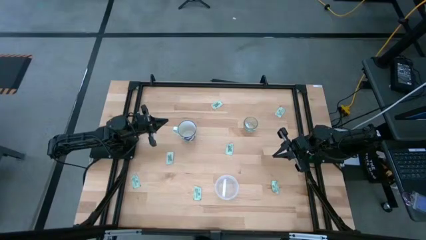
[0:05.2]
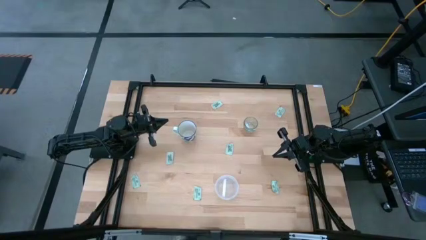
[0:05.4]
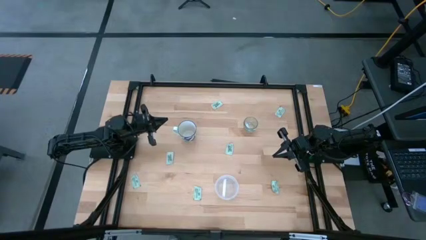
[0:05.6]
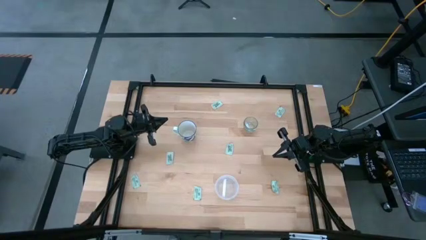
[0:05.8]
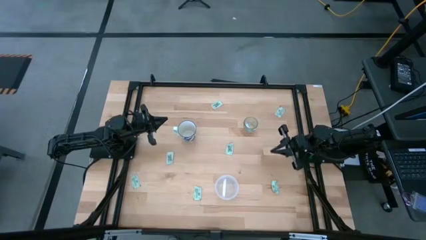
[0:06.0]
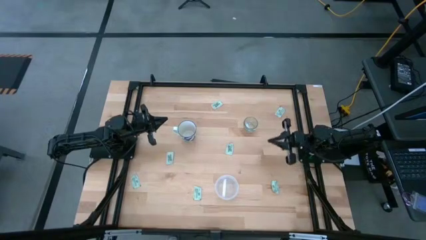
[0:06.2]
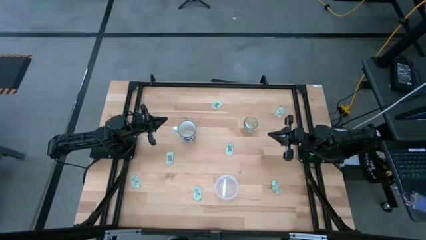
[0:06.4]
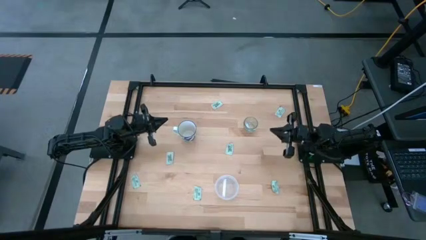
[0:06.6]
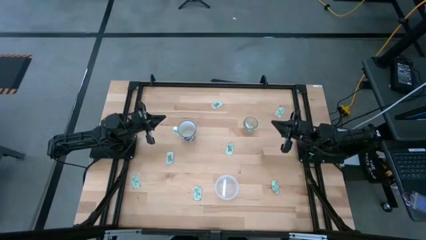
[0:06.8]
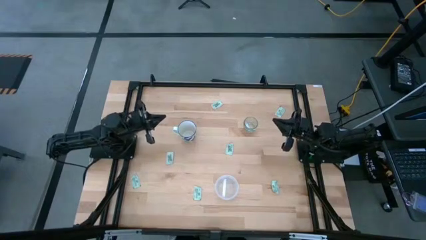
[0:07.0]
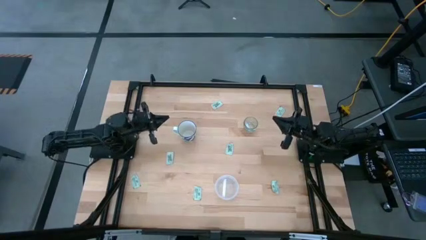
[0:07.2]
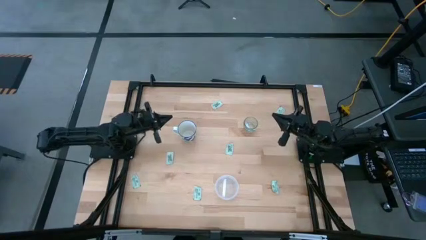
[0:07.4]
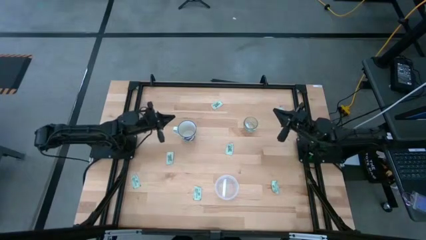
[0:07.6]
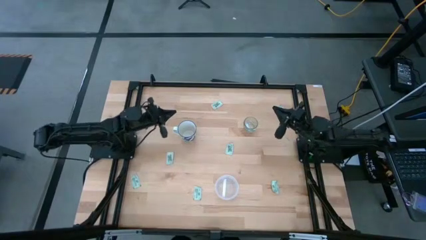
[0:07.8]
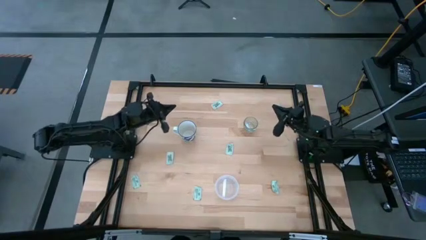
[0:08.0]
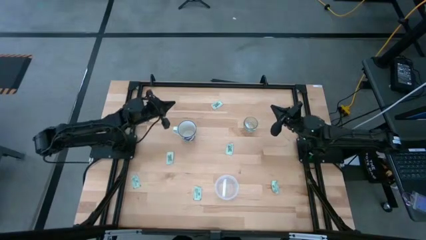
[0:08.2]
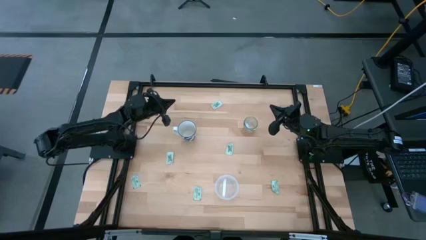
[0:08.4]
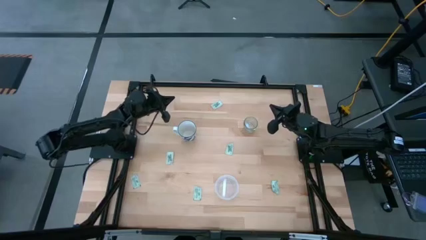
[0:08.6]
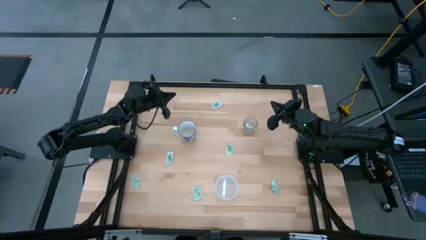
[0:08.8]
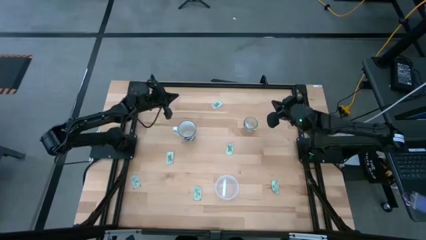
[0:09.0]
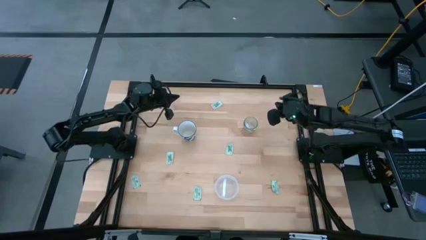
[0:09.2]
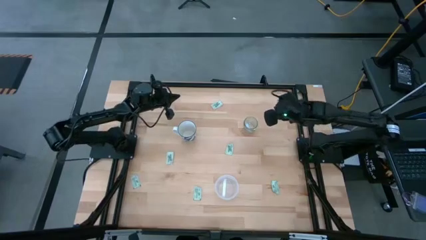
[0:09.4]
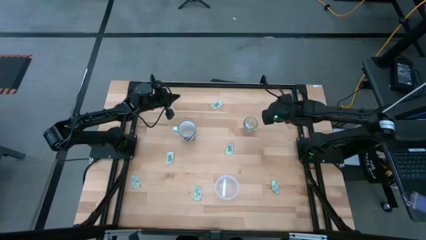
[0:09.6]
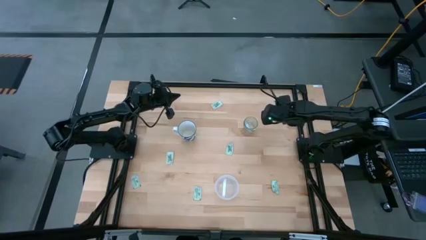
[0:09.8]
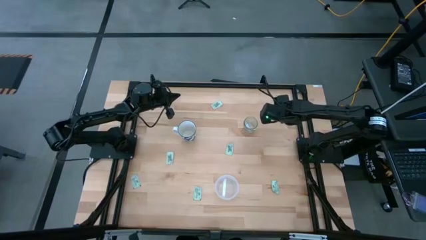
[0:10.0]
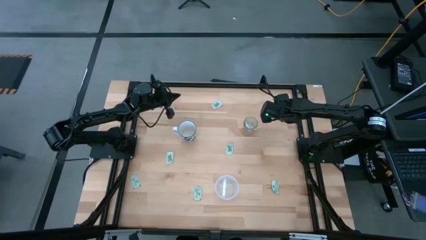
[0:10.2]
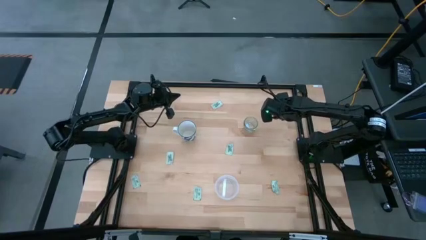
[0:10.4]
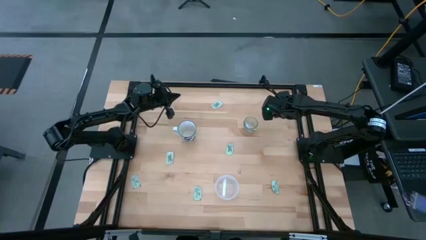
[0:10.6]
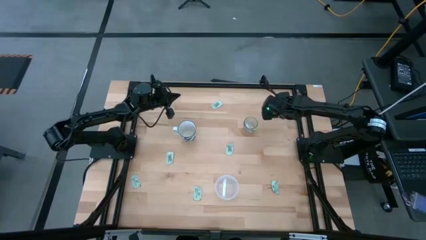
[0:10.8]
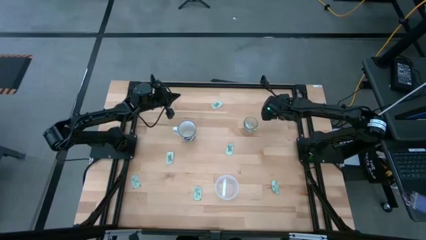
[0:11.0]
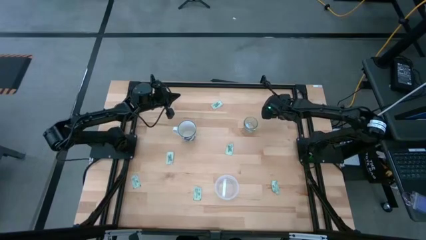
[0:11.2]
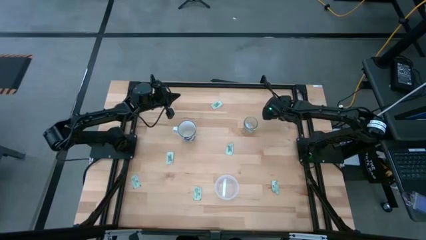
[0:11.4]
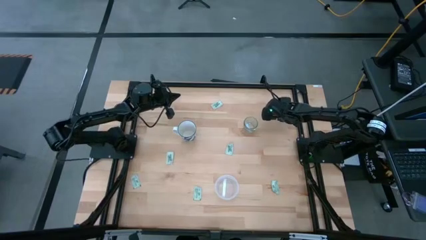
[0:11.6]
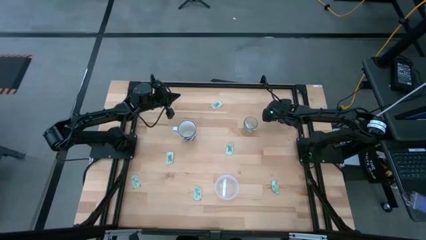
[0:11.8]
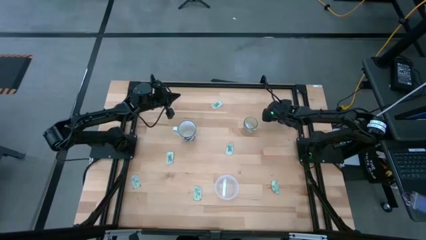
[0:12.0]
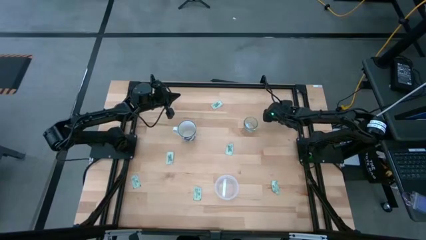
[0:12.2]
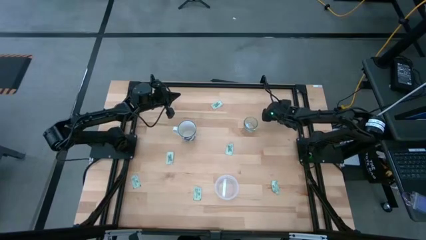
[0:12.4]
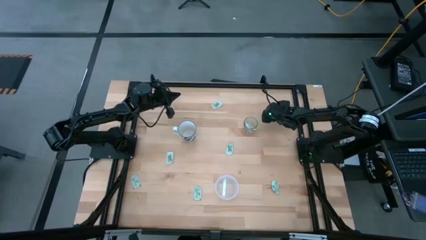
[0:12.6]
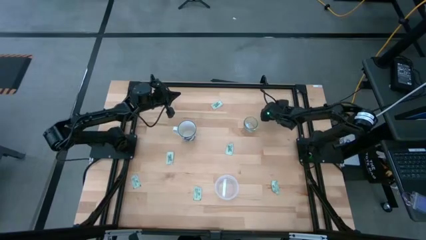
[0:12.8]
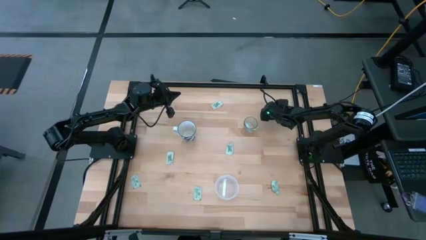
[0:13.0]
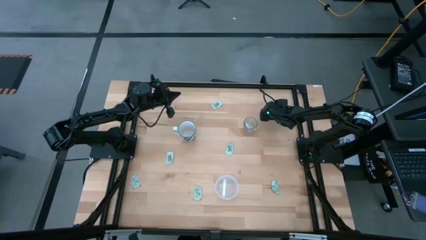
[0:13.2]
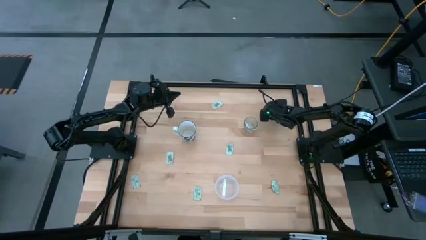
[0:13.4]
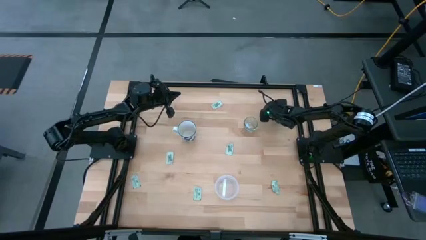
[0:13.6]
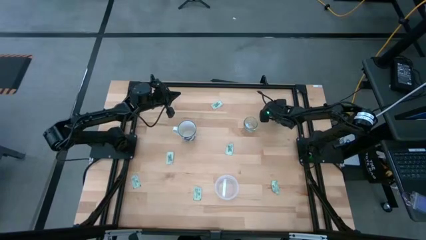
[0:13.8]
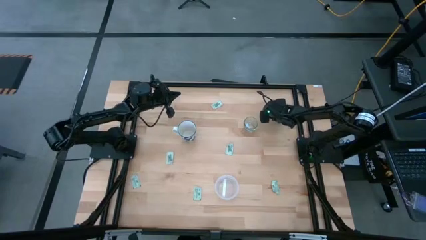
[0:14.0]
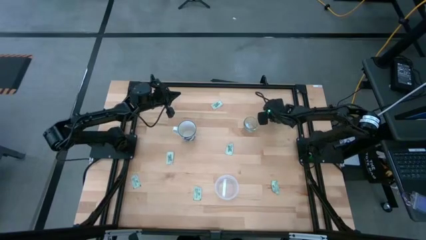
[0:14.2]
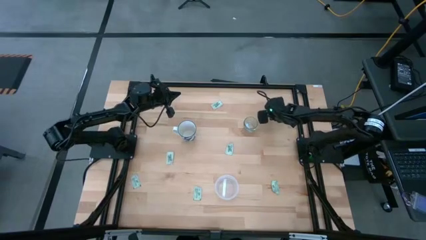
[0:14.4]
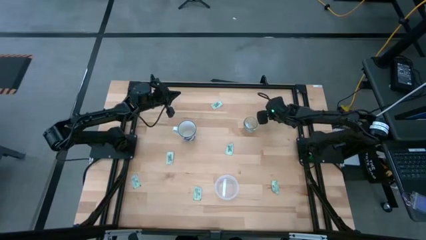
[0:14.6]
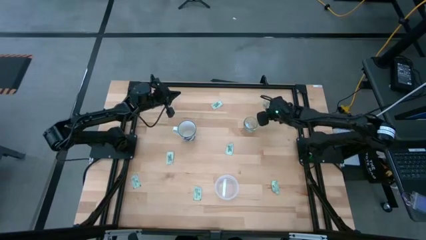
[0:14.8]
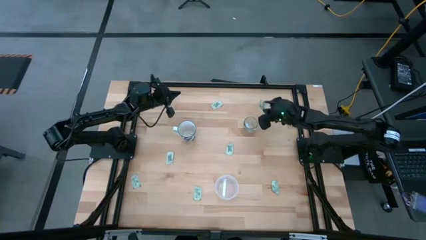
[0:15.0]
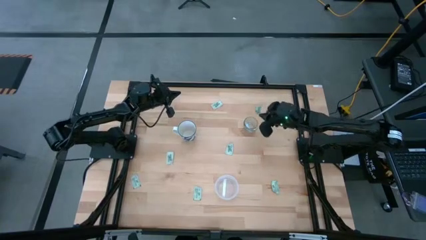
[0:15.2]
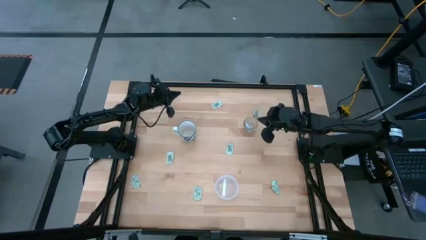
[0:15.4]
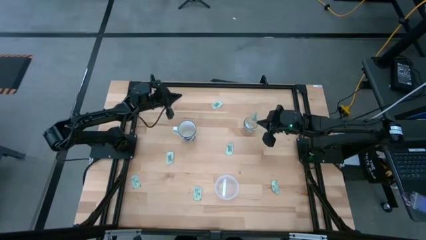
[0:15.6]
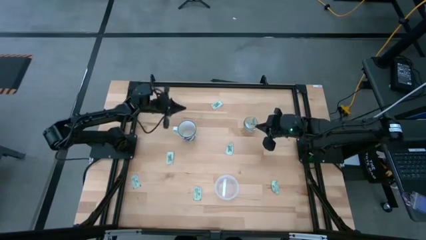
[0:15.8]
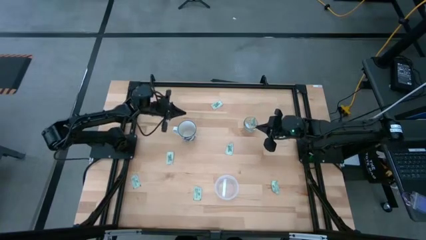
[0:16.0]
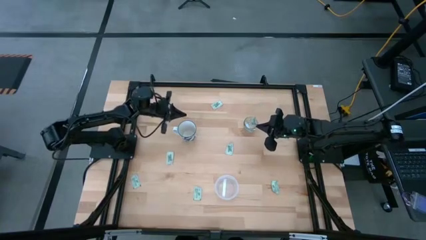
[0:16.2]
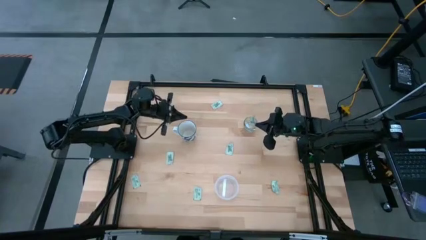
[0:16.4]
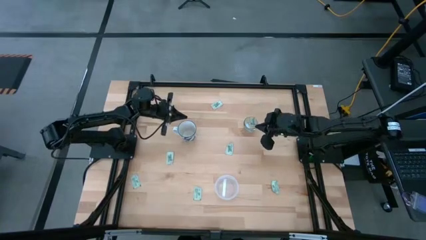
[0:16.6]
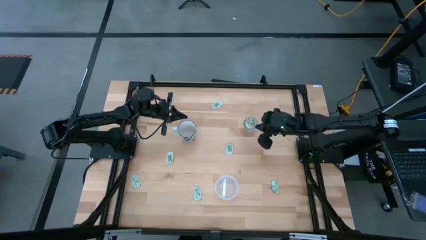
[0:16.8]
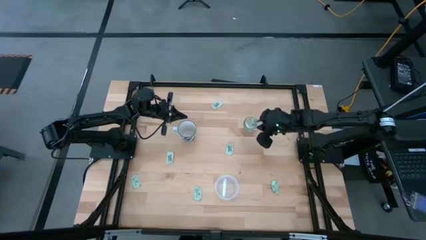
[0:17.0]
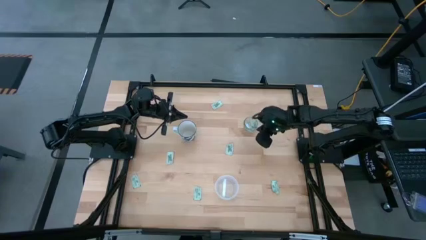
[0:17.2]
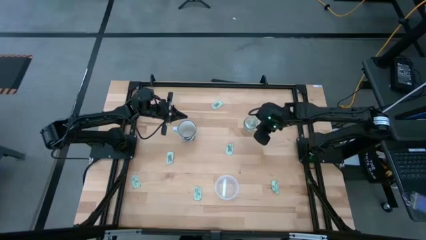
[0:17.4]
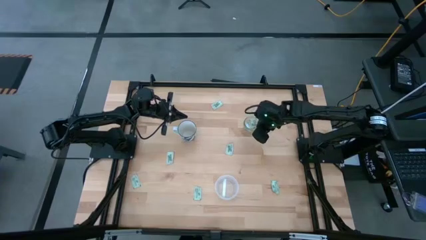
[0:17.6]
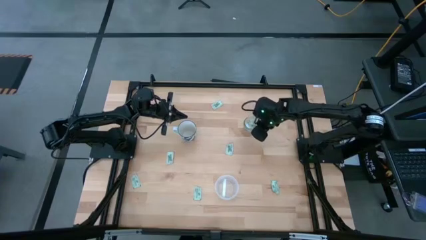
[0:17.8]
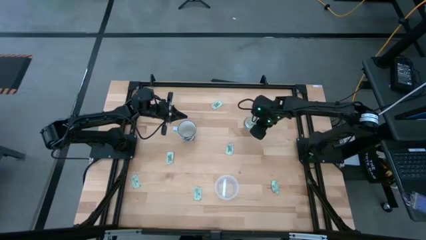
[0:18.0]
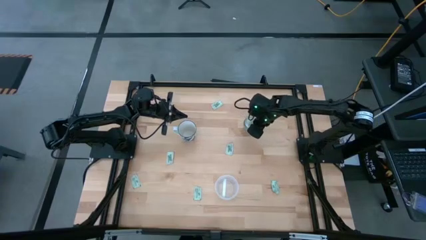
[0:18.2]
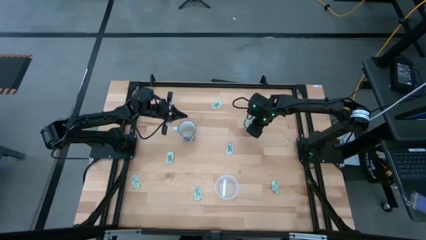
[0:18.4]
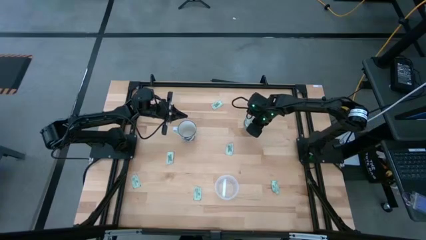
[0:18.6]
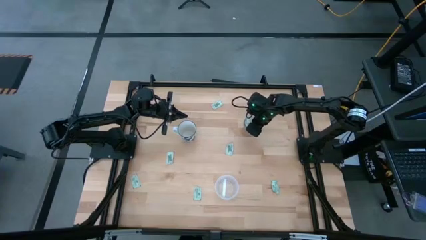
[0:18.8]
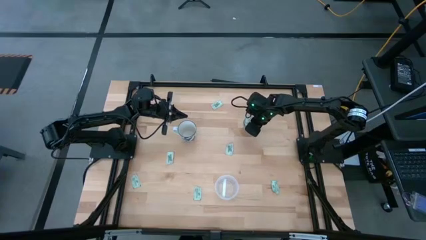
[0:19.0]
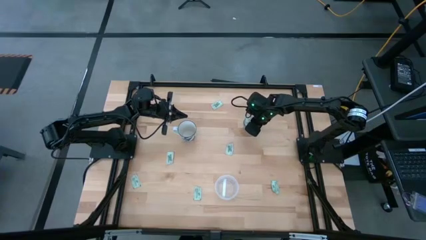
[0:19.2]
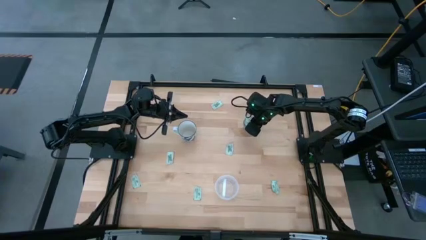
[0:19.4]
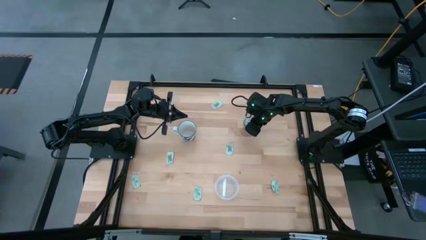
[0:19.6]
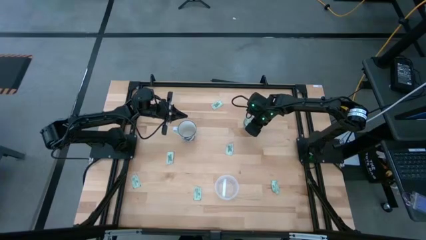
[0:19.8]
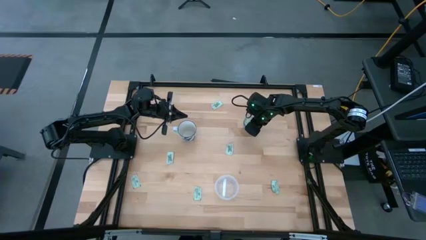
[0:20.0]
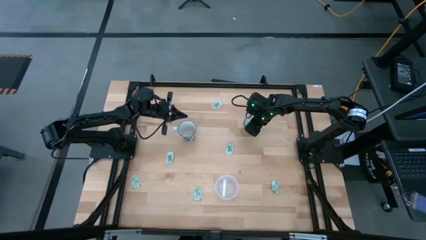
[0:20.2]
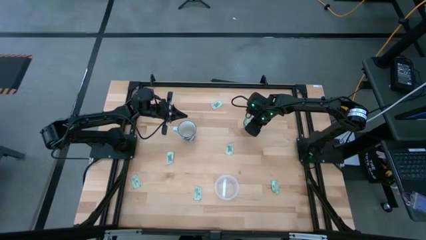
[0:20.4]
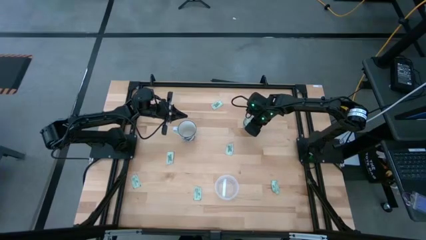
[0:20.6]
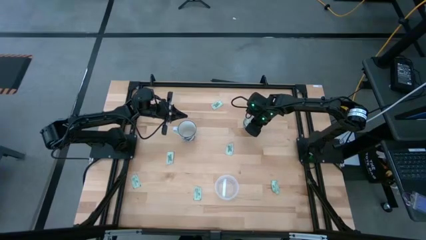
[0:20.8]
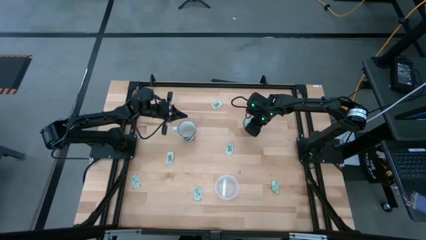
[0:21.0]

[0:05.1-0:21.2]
Task: Pick and place Stevia / Truvia into bins
Put the white stevia packet into the transparent glass cup
